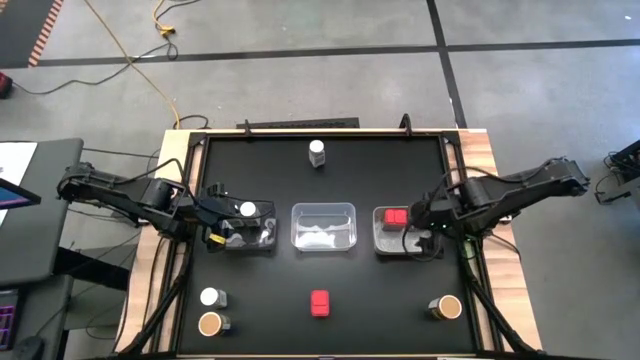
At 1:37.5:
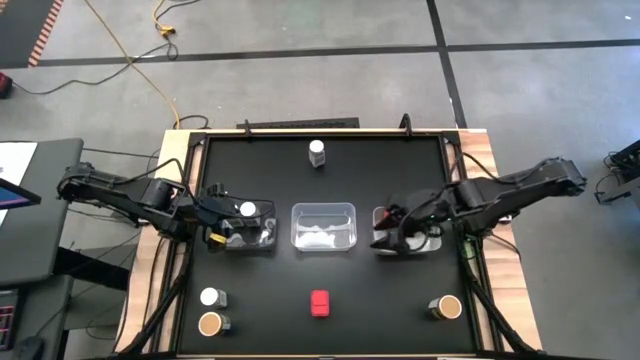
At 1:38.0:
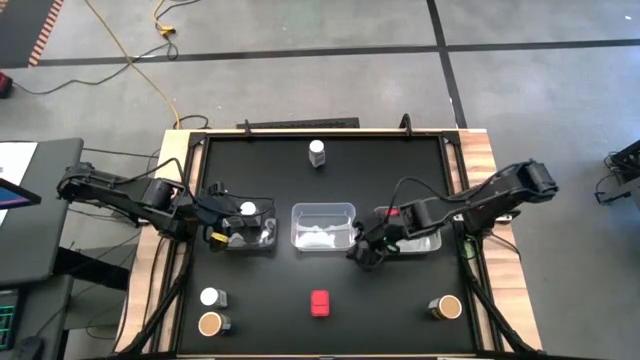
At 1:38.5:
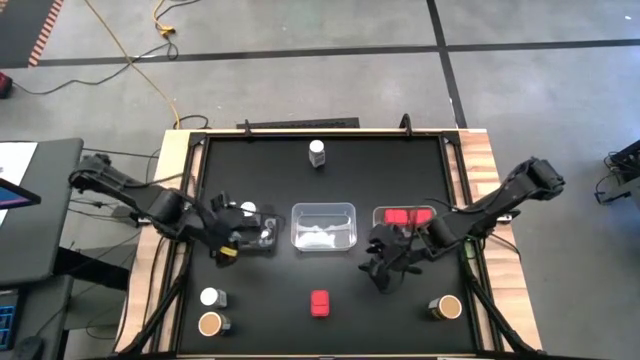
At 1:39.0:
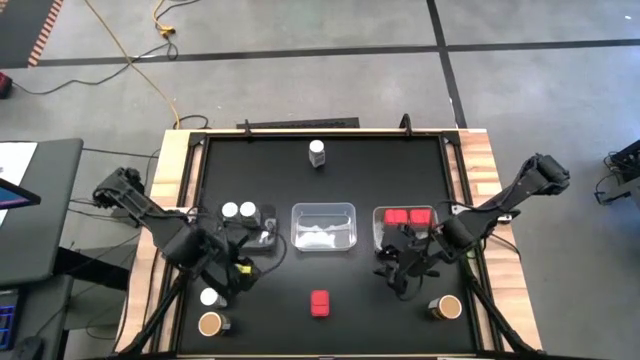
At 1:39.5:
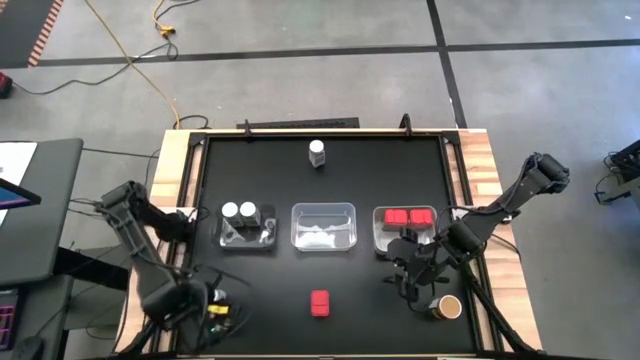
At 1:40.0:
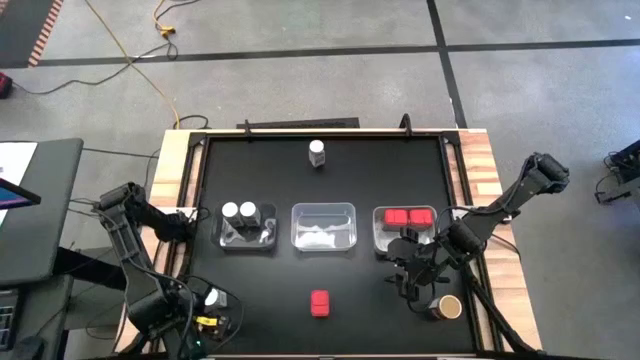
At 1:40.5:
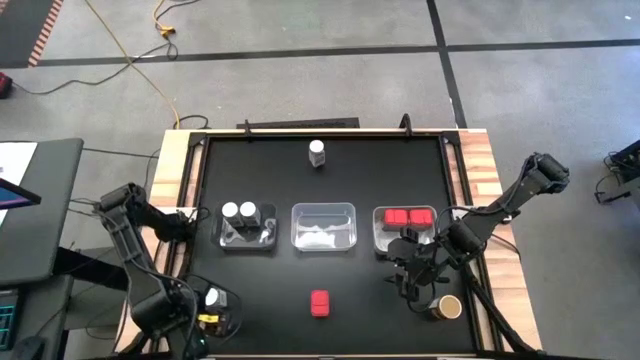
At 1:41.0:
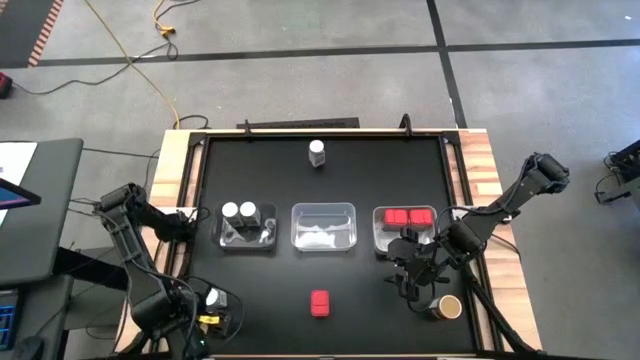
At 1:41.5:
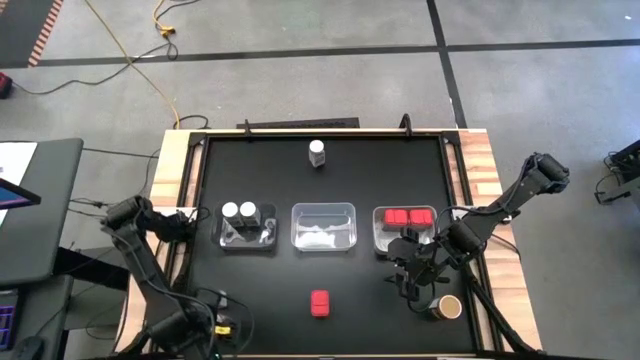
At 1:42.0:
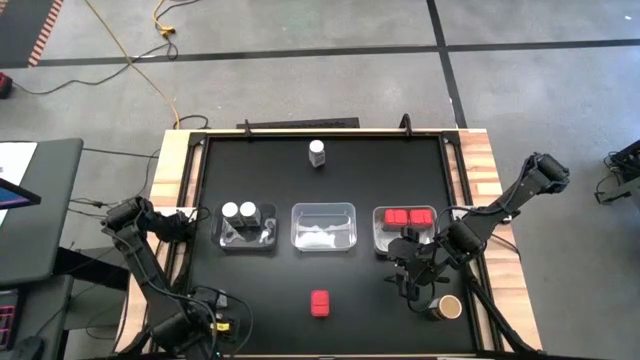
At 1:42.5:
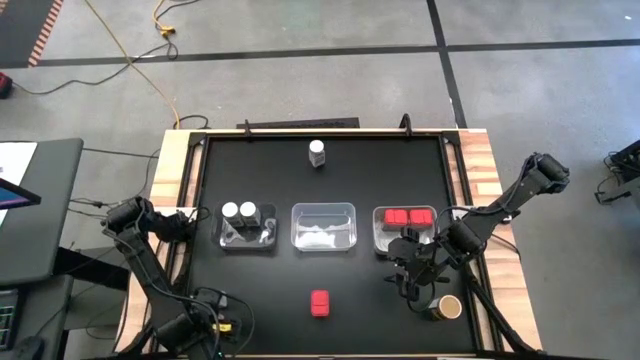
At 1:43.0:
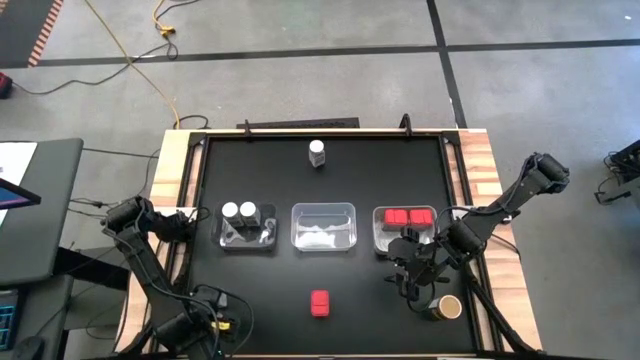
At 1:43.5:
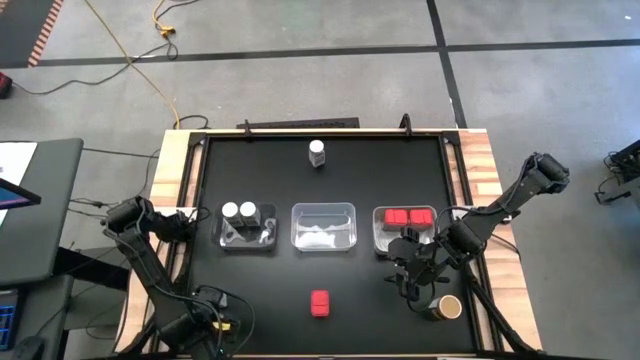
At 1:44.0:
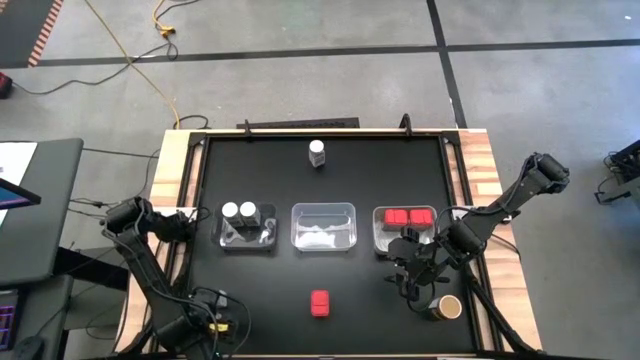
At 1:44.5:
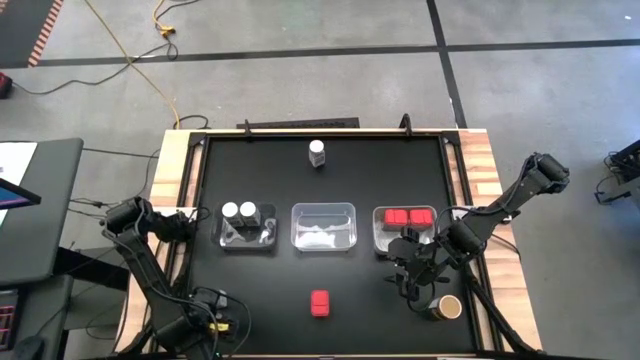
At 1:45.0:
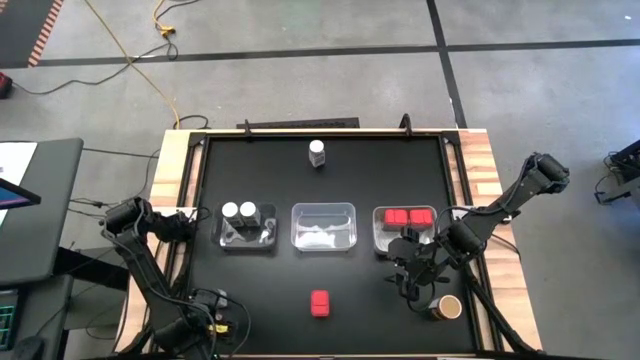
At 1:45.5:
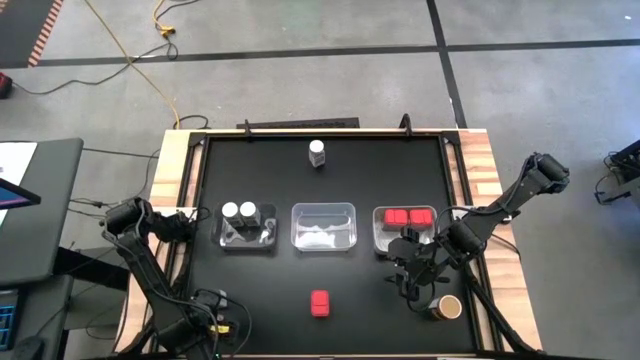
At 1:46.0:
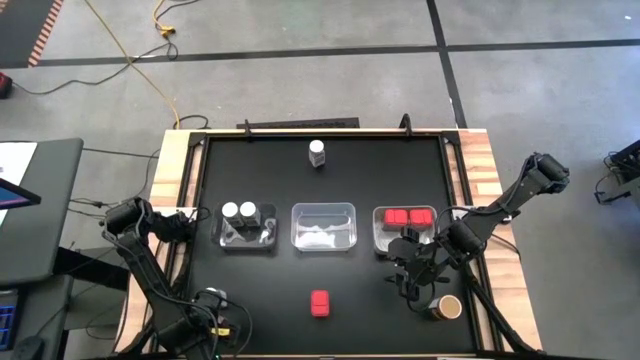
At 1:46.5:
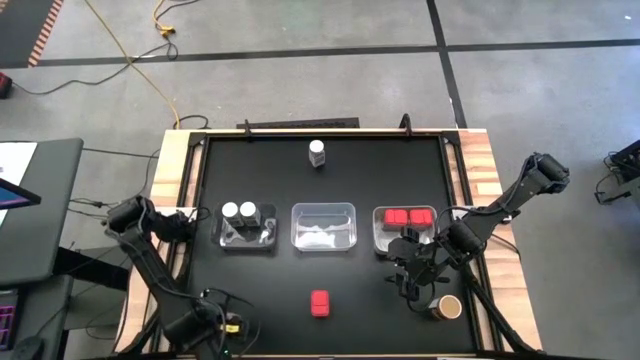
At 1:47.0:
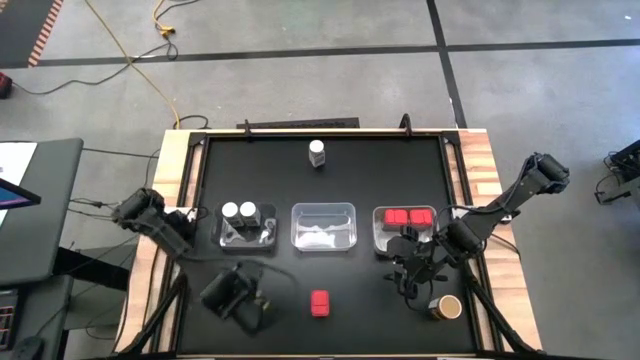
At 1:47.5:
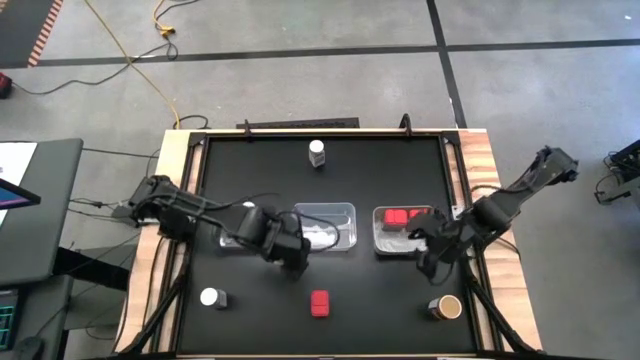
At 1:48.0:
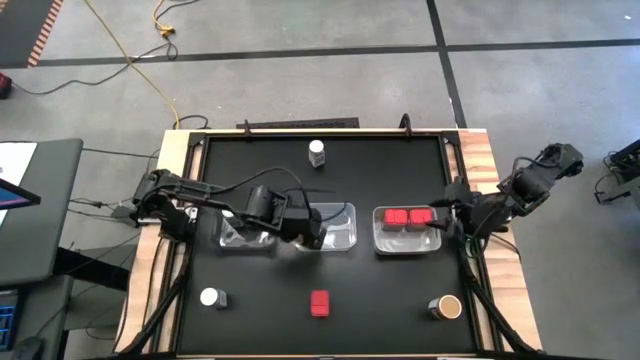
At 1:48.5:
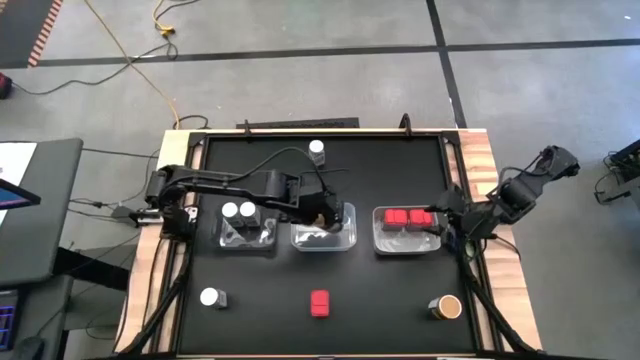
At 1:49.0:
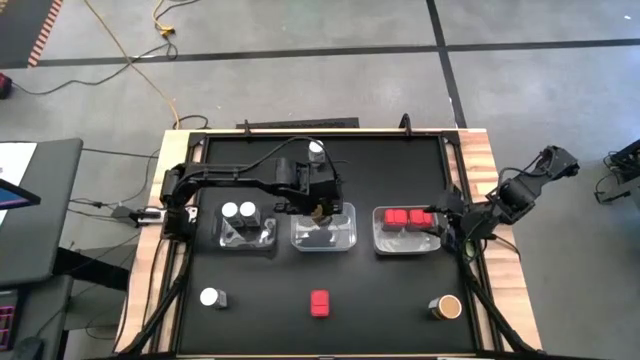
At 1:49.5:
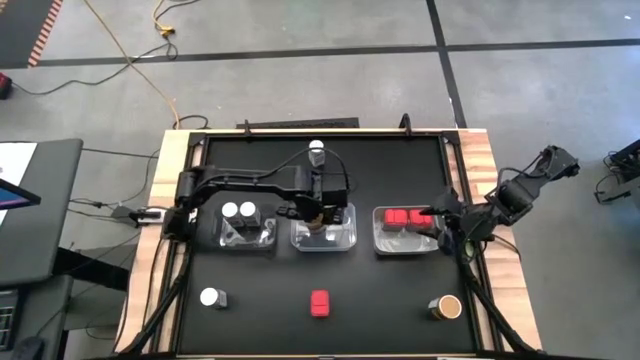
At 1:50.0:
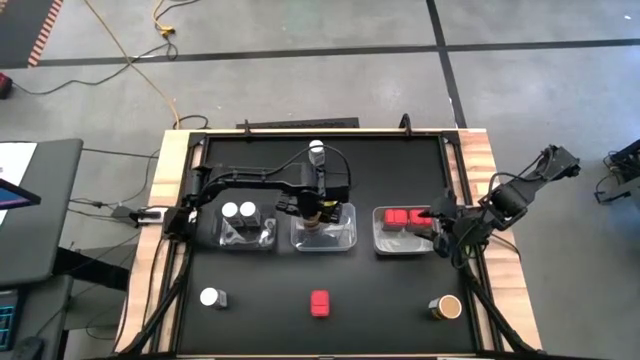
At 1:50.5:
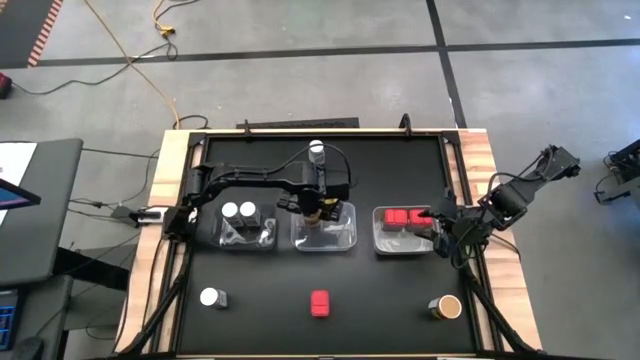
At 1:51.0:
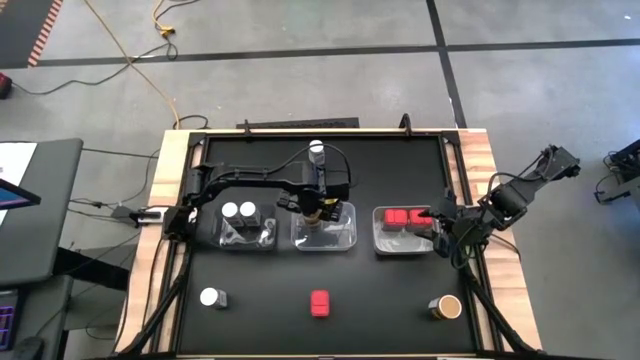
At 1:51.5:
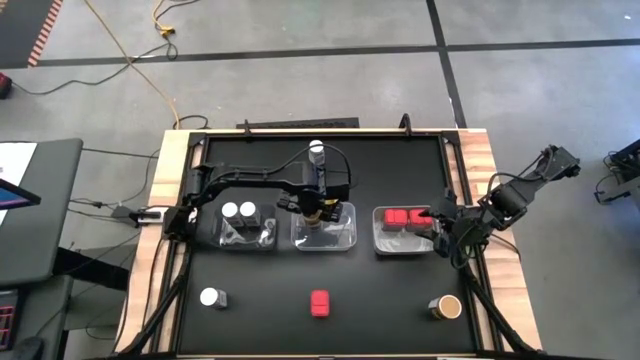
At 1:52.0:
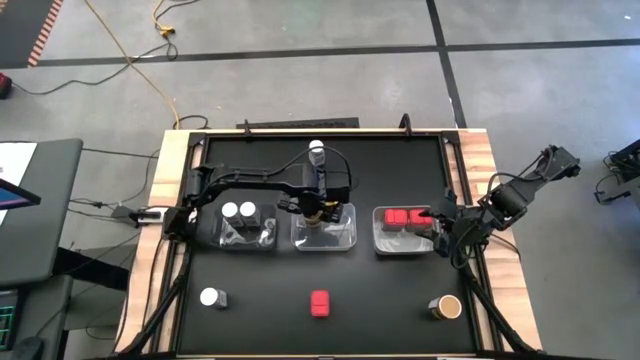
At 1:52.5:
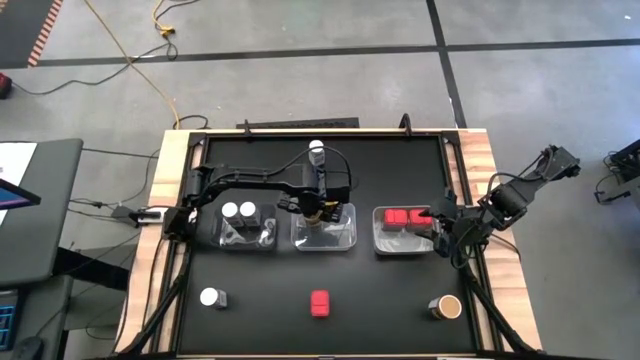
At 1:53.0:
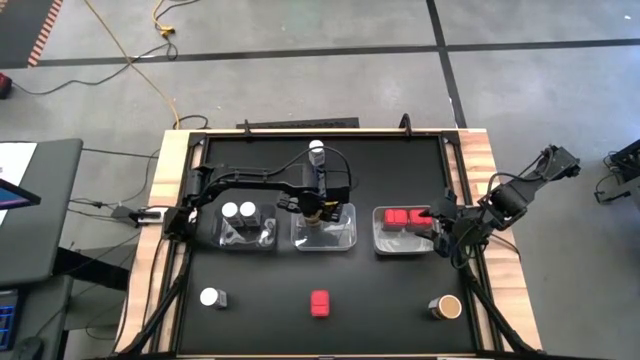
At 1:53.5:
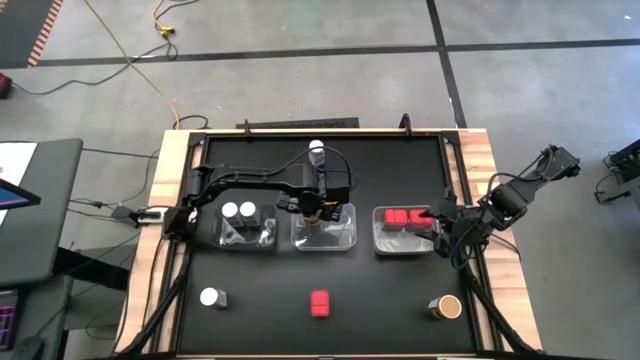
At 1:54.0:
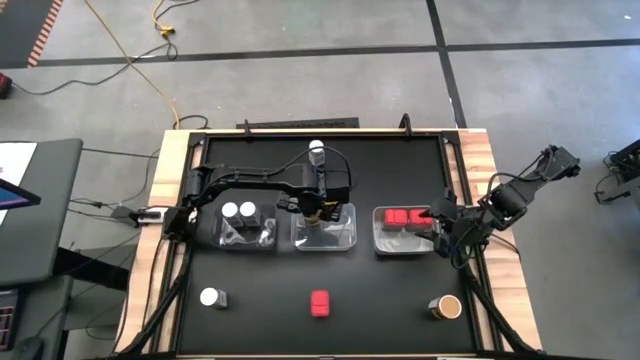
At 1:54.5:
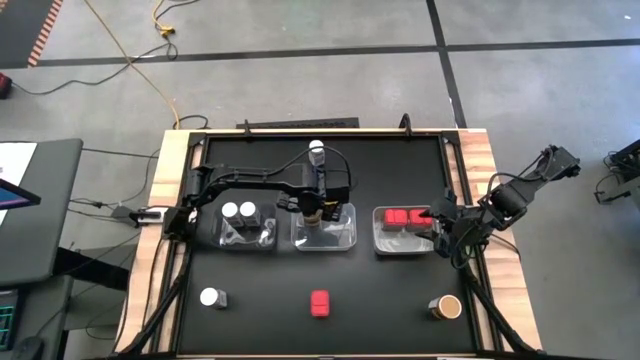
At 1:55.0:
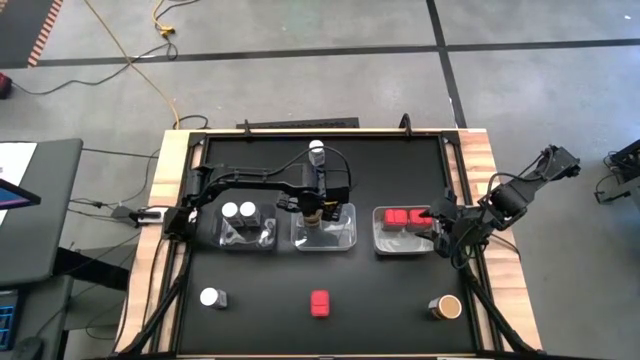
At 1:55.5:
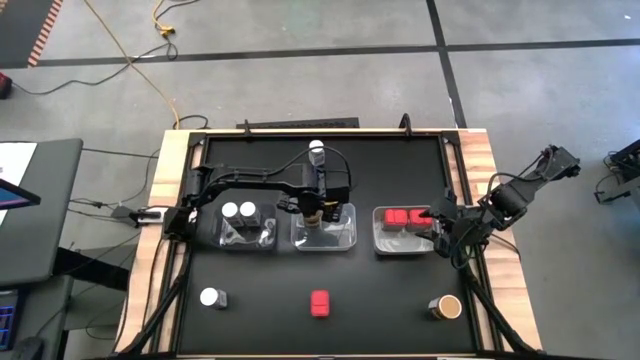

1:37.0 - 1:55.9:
Task: Sort spices by type
Put the left gold seasoning bottle into the transparent bin

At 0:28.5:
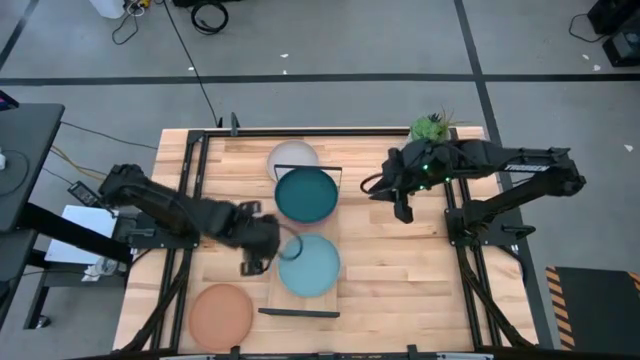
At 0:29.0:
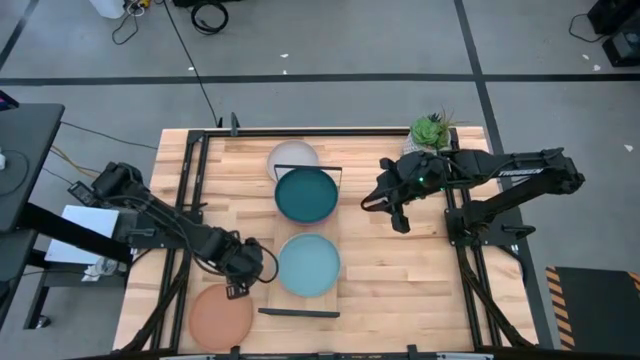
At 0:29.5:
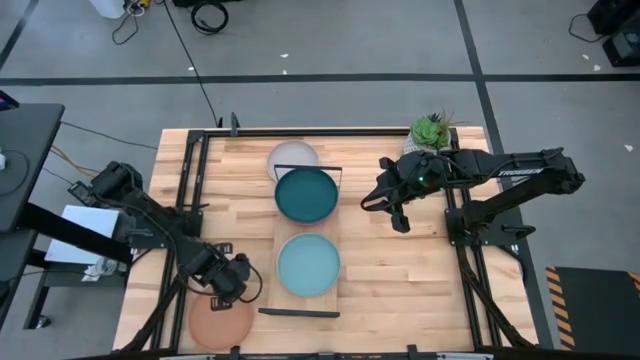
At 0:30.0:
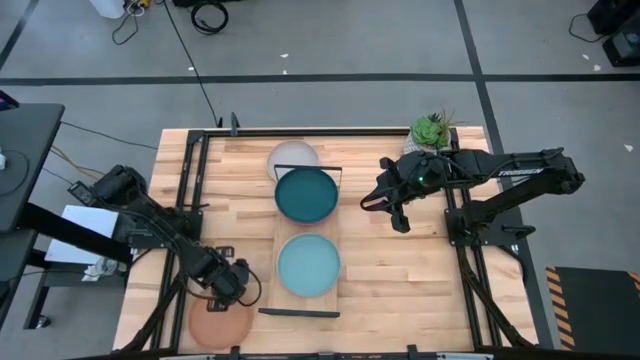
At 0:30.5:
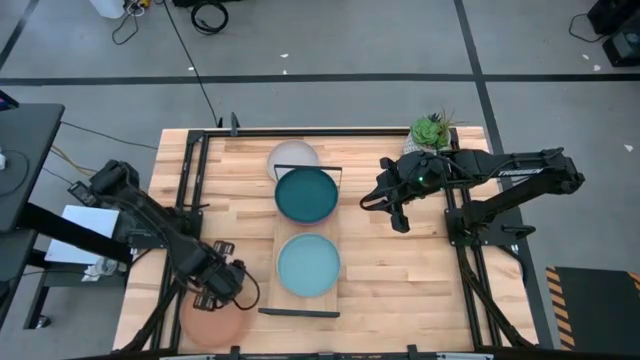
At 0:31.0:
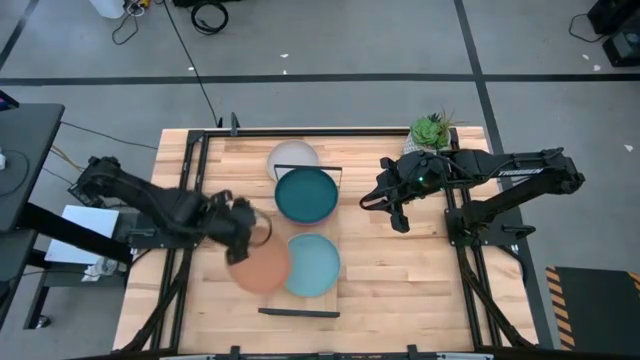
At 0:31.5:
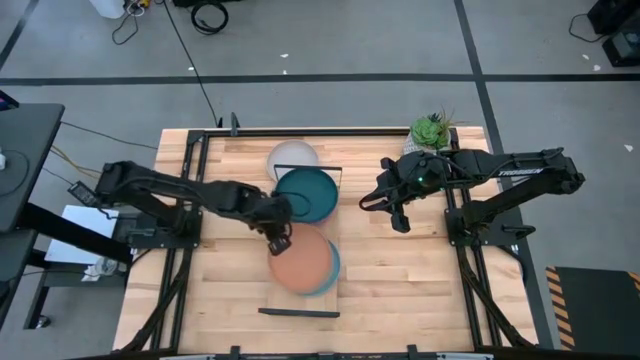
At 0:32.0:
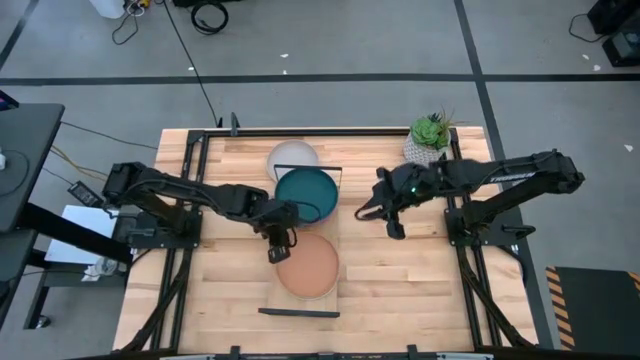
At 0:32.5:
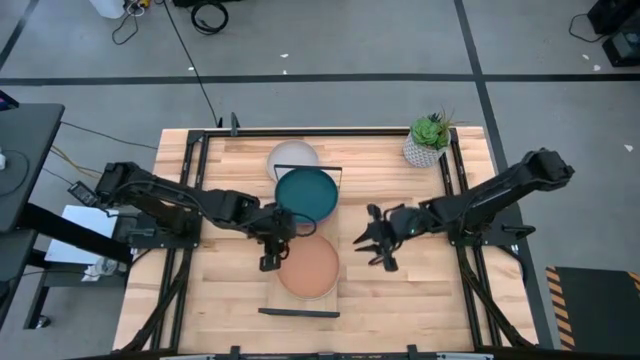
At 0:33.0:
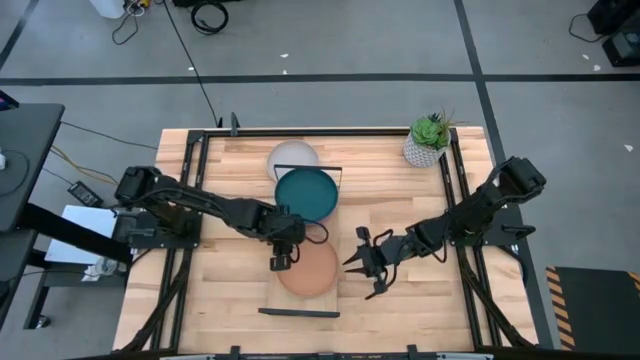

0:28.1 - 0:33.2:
Task: Place and stack plates onto a shelf
Stack the brown plate on top of the light blue plate on the shelf
